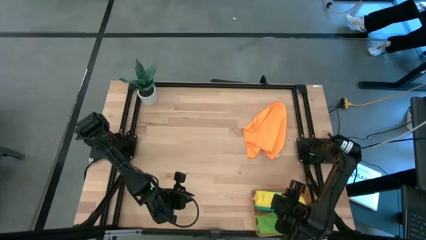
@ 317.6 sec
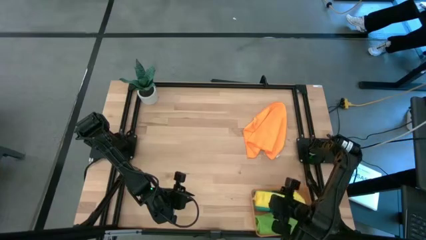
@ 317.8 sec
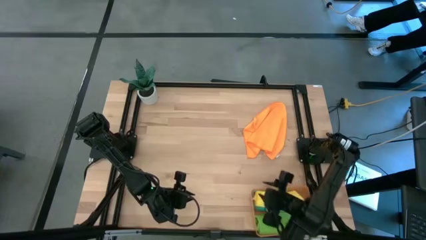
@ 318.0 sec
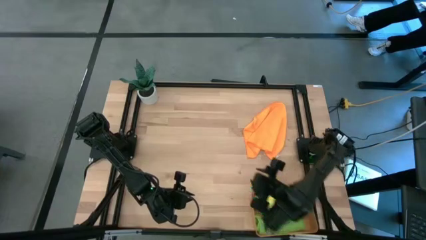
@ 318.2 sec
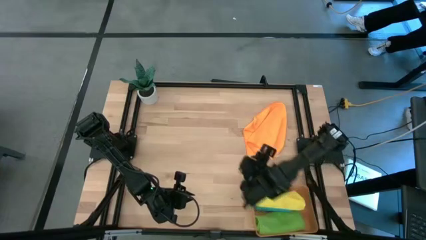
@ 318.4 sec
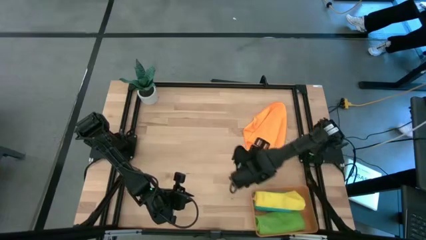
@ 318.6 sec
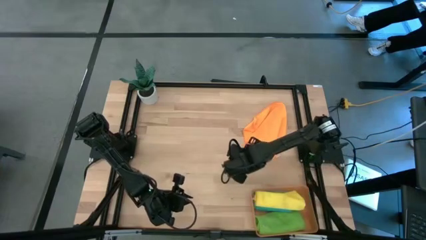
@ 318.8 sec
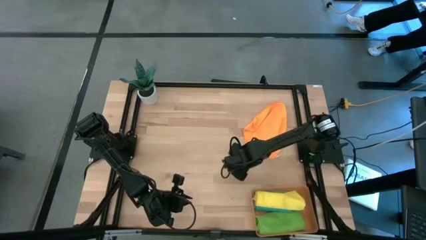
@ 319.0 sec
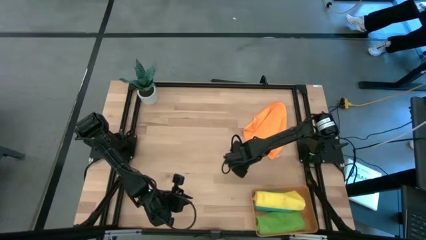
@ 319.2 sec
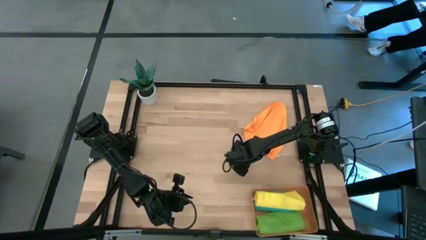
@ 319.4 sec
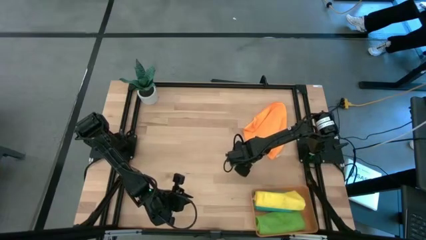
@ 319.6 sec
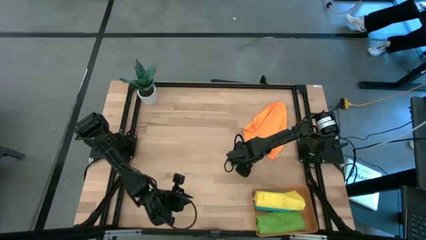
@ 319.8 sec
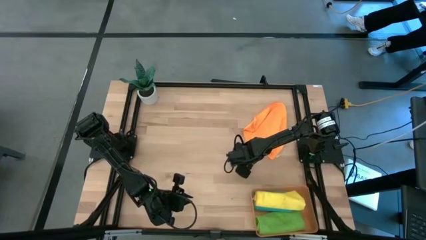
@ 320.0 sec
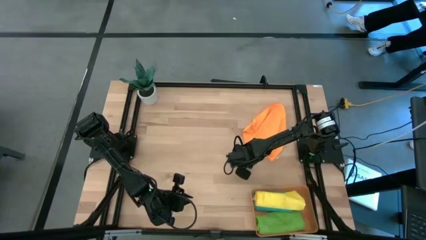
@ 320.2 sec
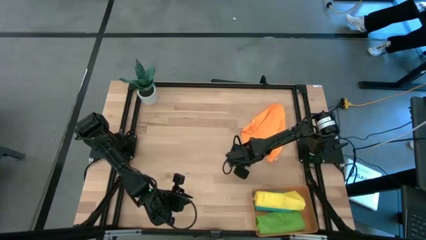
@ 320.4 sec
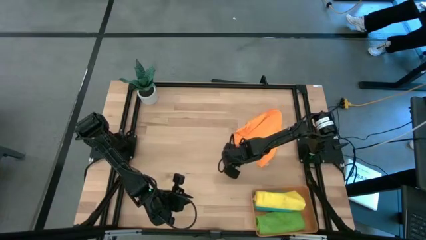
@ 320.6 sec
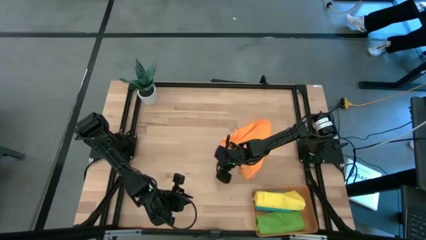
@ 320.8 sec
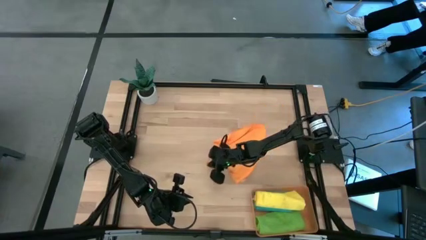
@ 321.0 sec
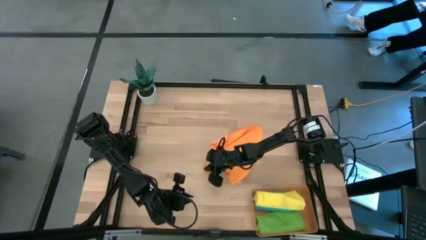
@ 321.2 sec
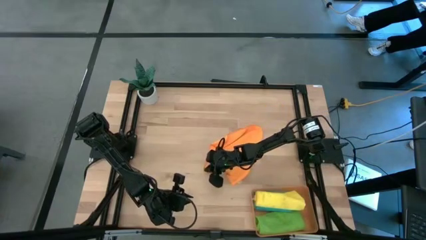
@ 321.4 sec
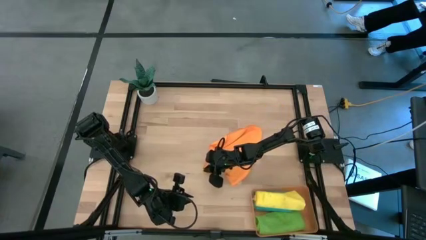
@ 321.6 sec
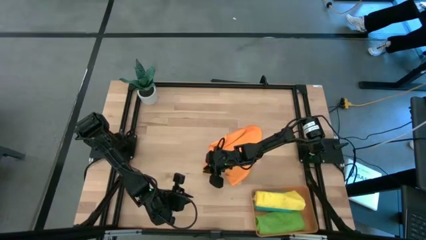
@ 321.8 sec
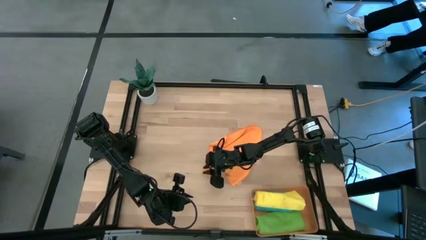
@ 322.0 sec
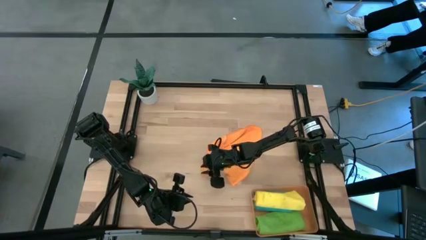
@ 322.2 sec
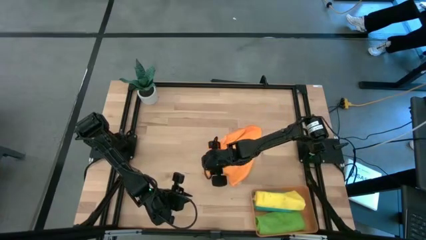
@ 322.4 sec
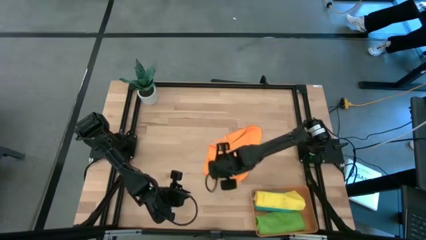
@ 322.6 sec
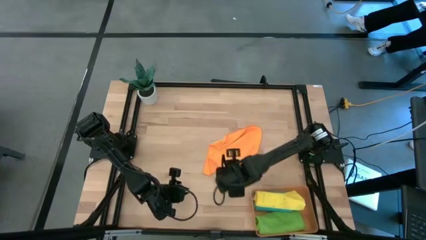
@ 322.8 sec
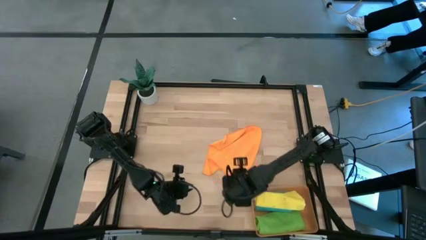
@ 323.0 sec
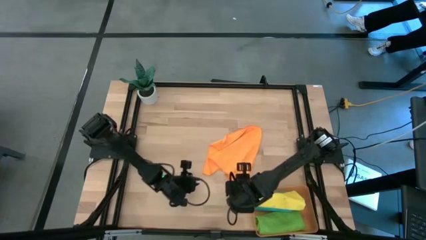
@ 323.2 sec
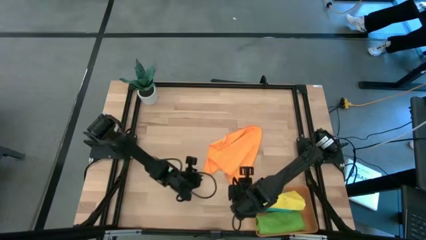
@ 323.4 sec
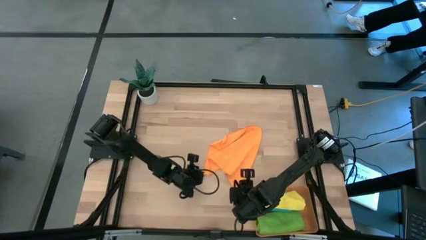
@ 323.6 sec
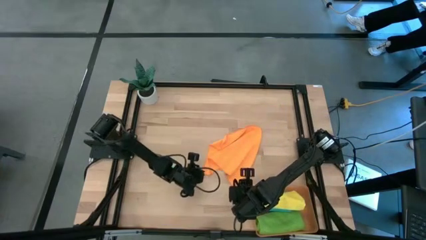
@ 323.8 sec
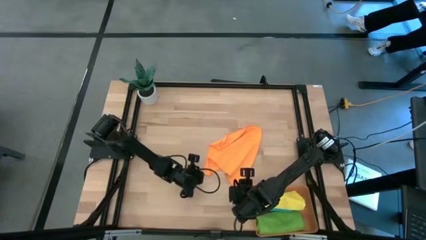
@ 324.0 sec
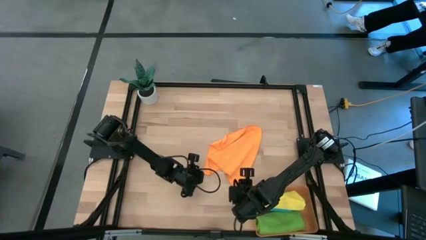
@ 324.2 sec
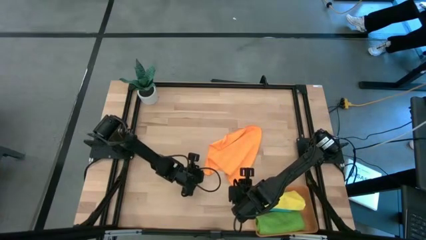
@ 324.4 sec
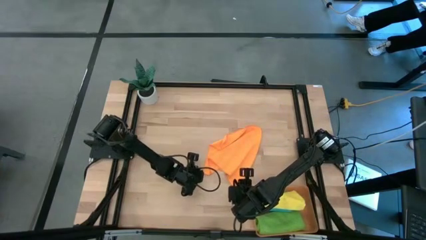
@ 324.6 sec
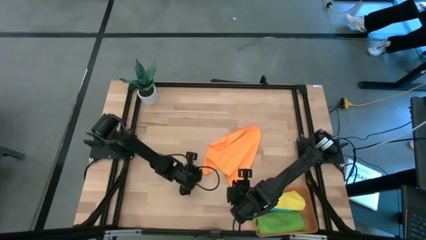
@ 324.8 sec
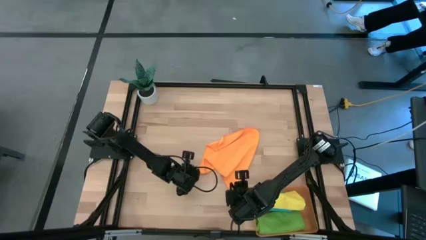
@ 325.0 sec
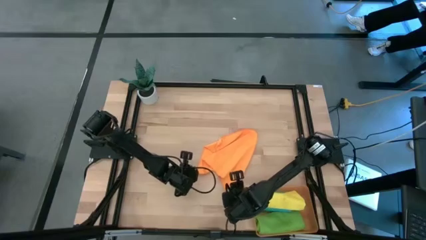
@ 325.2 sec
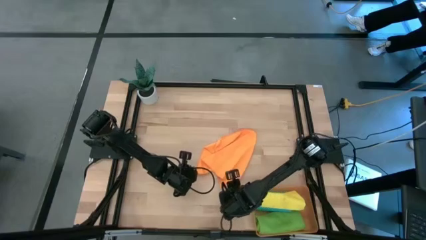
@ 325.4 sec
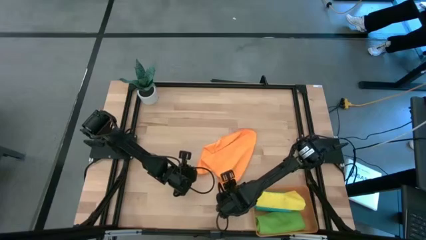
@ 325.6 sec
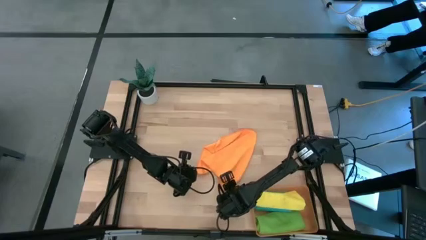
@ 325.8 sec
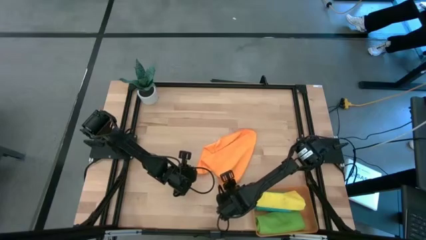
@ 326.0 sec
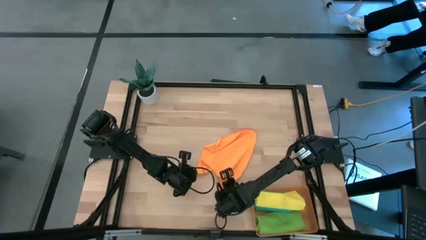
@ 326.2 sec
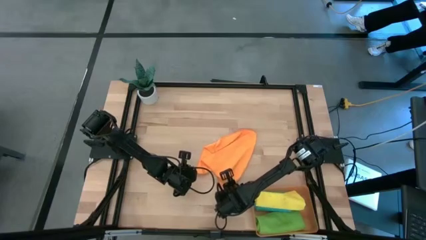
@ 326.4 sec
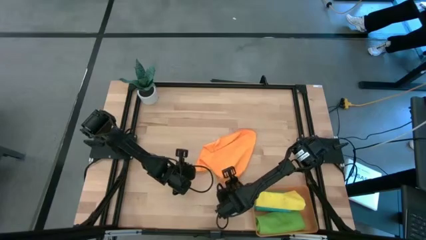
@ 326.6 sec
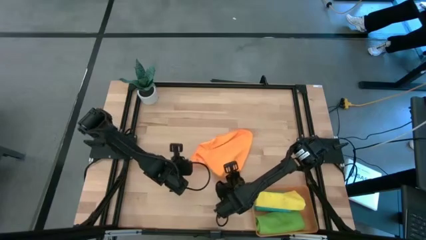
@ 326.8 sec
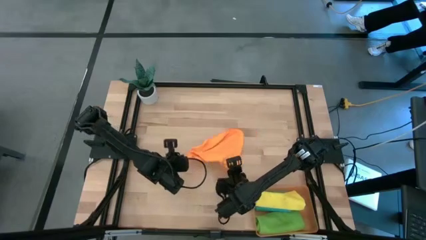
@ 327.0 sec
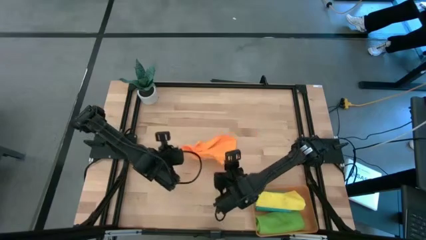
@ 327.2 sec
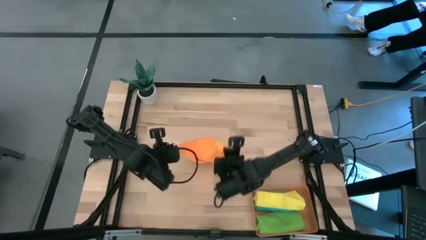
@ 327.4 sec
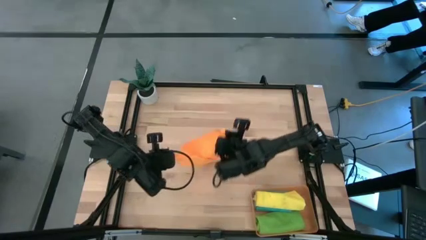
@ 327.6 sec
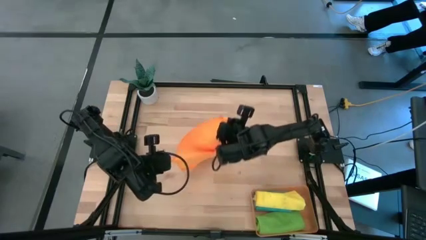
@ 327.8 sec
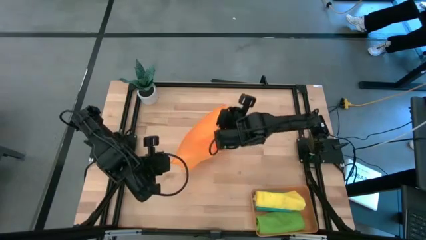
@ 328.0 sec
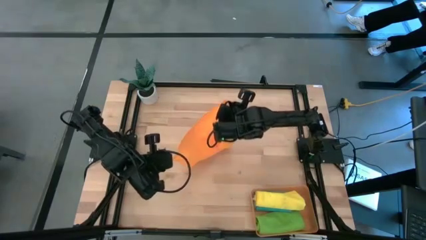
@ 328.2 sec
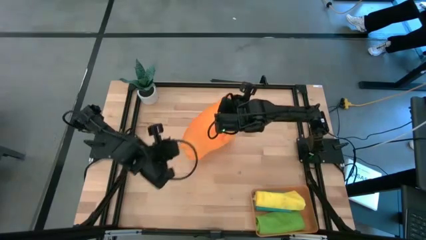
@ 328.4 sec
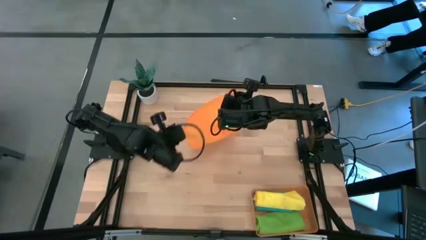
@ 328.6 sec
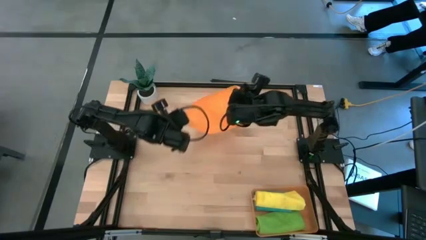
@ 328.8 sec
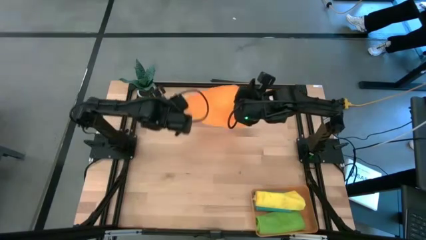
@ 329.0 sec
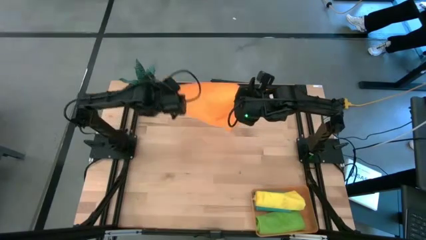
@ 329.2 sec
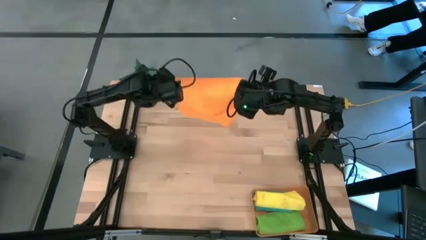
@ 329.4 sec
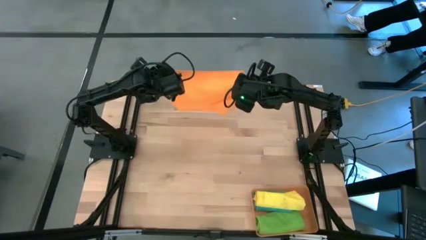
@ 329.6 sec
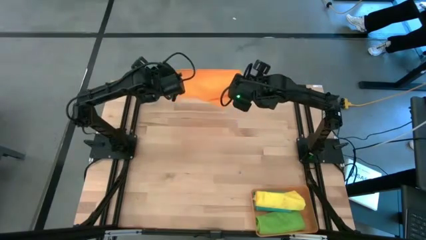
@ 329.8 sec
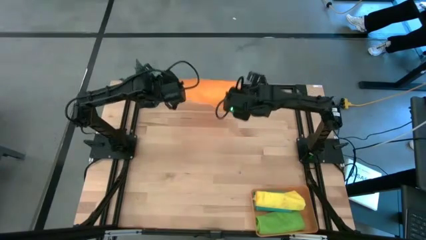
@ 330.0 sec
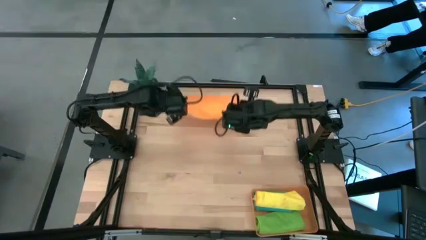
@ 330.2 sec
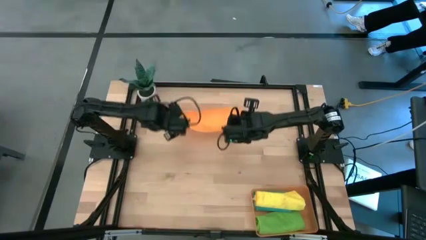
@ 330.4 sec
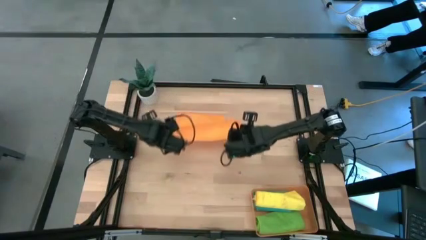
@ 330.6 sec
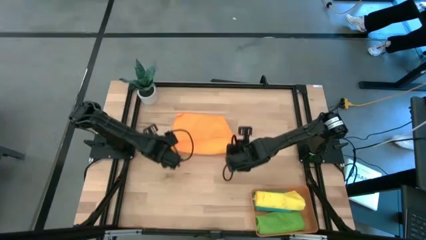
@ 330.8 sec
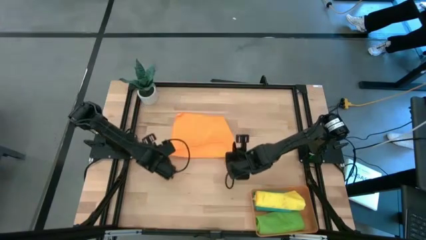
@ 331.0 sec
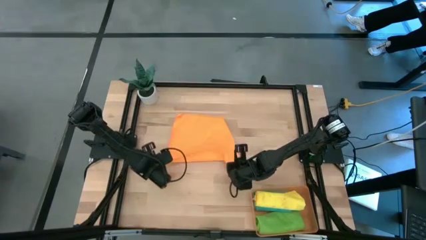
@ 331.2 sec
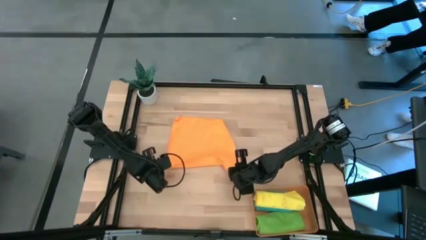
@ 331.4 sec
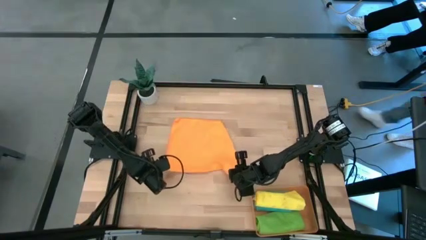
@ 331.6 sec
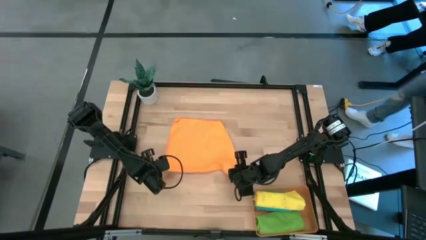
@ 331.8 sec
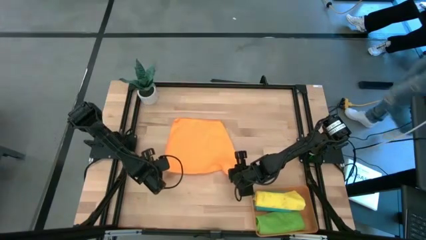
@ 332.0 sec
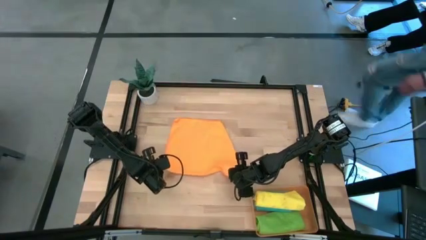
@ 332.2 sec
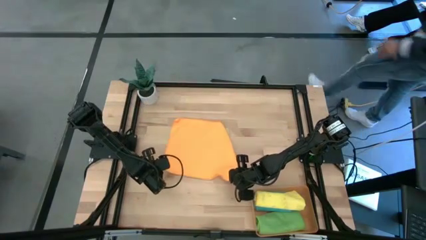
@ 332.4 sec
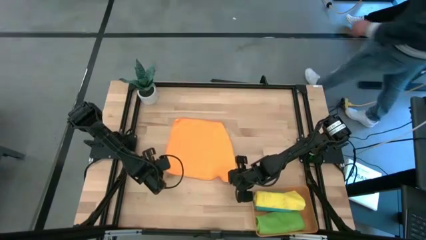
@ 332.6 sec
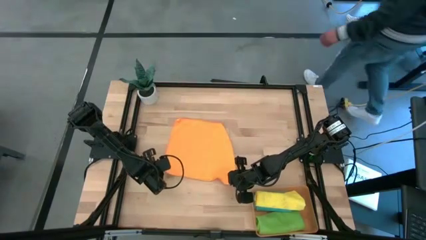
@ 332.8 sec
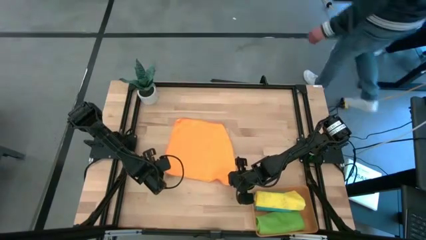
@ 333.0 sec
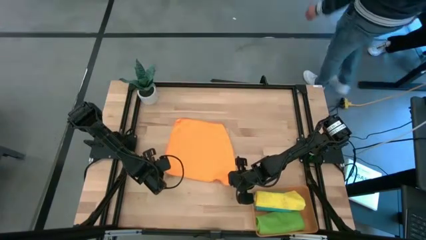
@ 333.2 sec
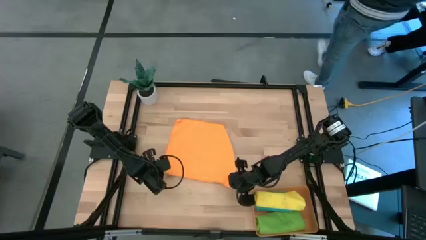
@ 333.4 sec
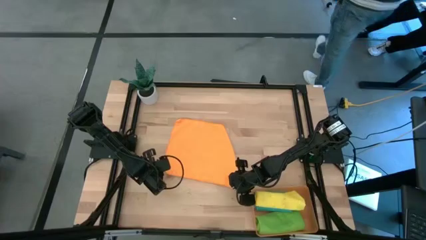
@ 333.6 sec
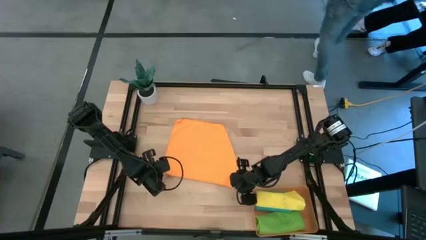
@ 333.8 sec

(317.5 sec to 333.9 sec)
Task: Roll microfiber towels into tight, uniform cylinder then place into a basket
Roll the orange microfiber towel
